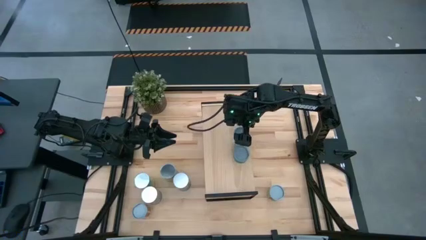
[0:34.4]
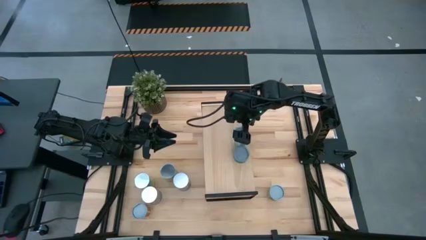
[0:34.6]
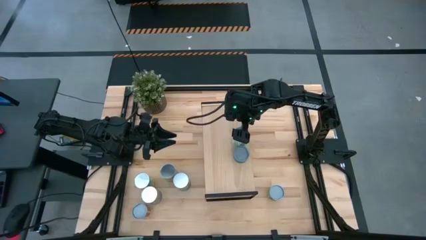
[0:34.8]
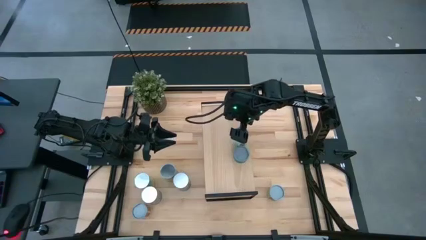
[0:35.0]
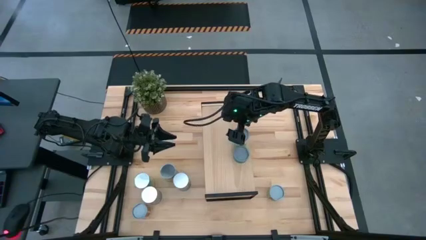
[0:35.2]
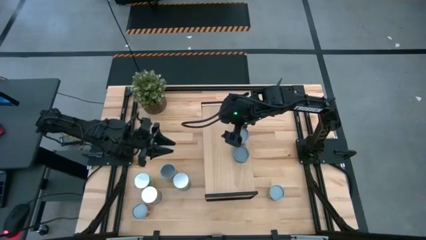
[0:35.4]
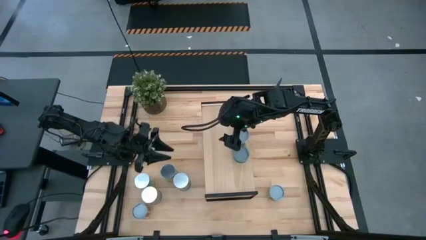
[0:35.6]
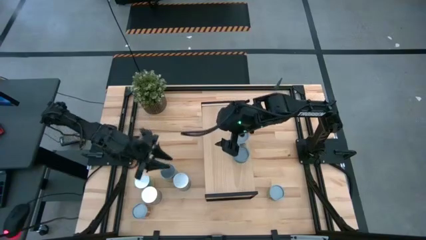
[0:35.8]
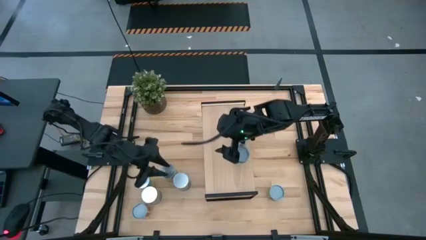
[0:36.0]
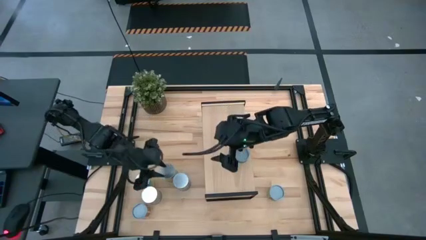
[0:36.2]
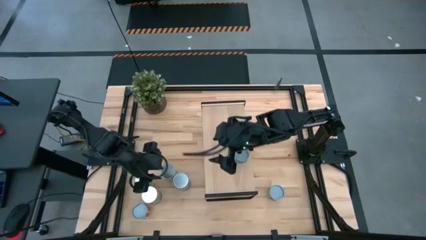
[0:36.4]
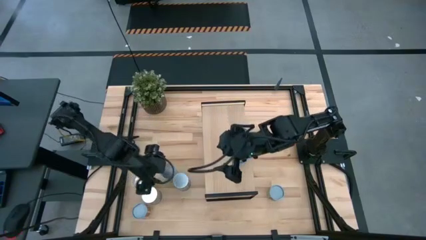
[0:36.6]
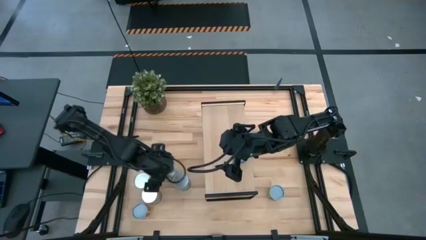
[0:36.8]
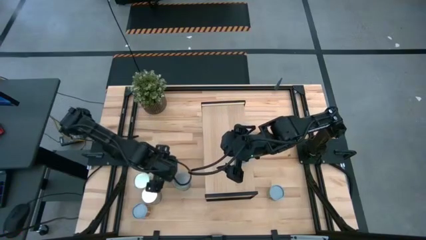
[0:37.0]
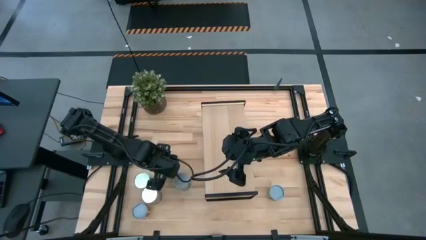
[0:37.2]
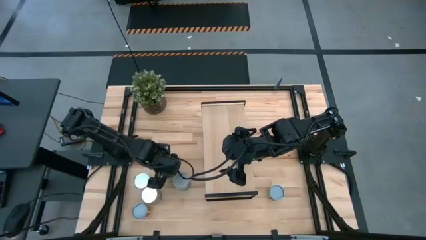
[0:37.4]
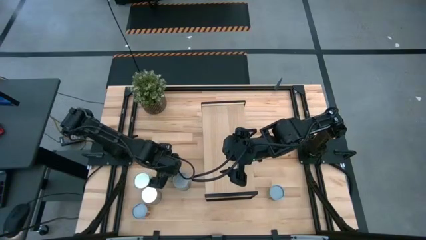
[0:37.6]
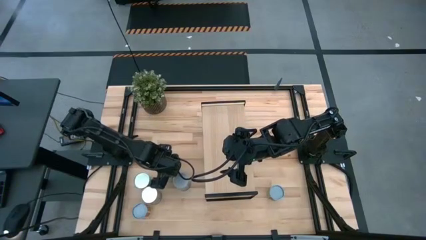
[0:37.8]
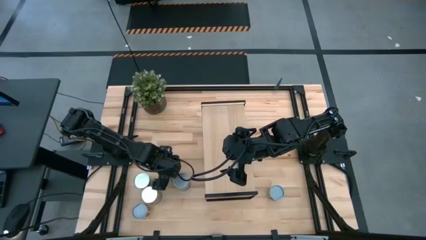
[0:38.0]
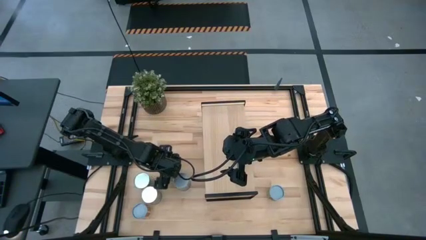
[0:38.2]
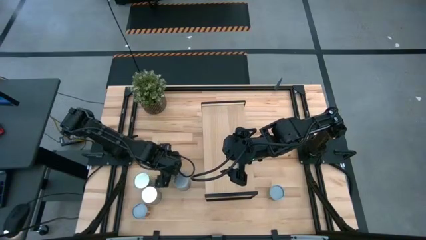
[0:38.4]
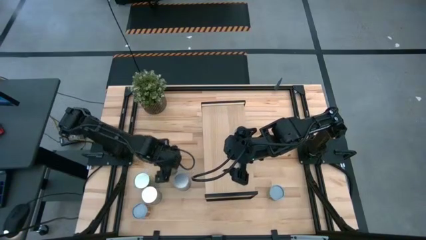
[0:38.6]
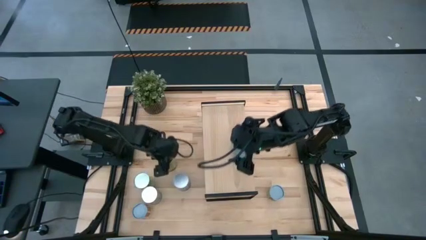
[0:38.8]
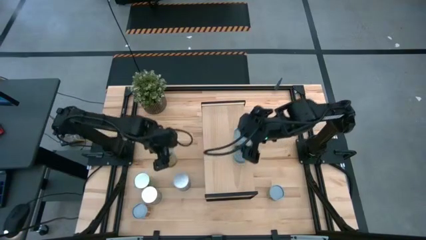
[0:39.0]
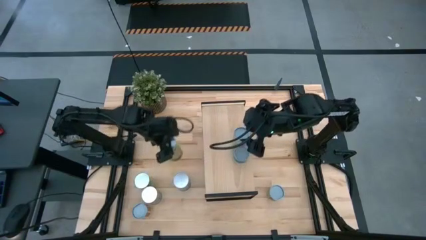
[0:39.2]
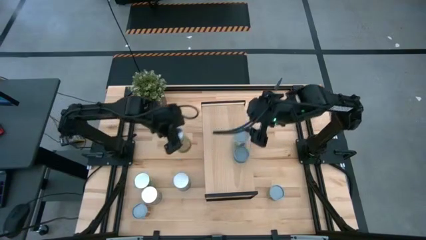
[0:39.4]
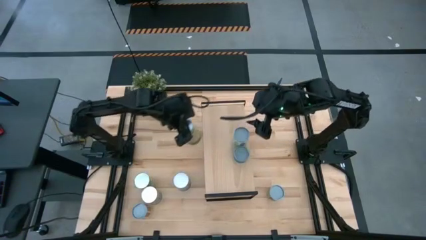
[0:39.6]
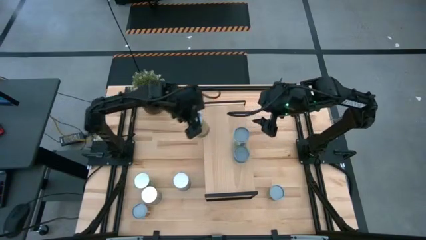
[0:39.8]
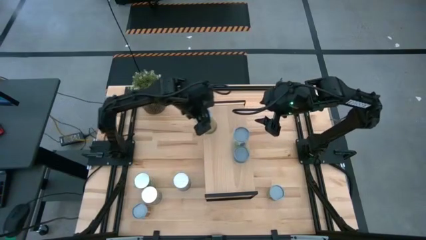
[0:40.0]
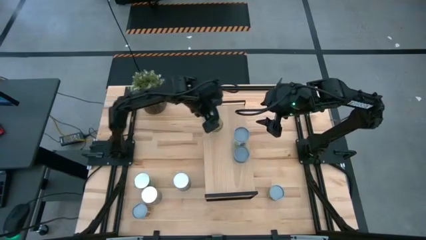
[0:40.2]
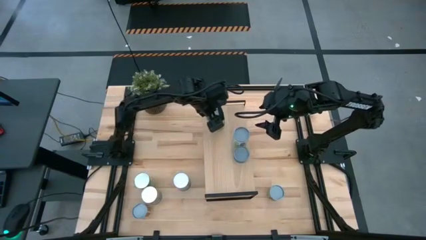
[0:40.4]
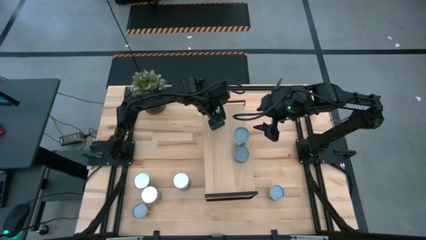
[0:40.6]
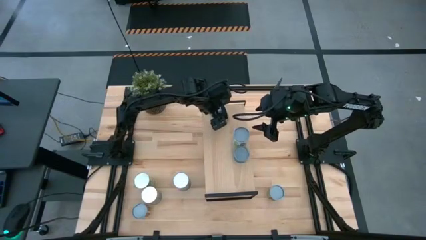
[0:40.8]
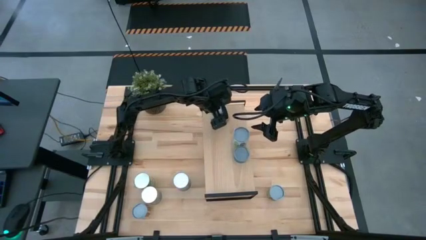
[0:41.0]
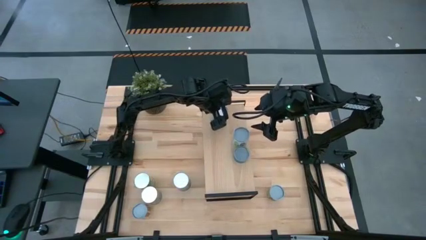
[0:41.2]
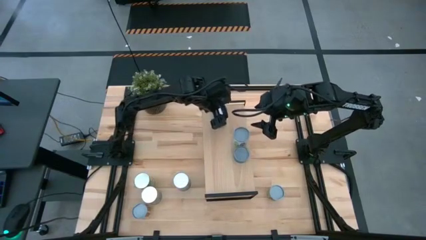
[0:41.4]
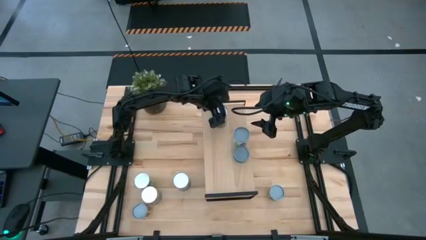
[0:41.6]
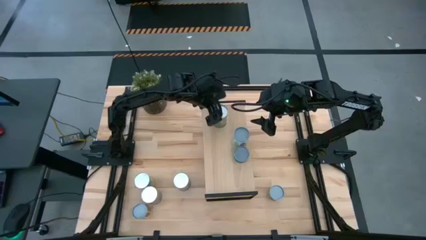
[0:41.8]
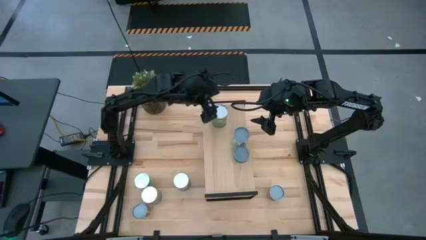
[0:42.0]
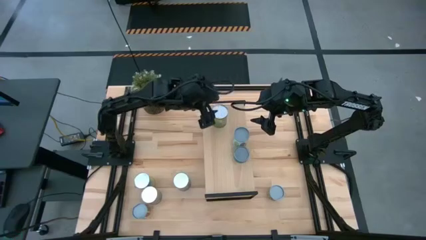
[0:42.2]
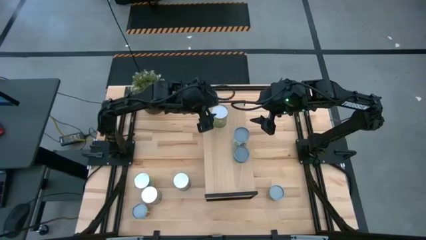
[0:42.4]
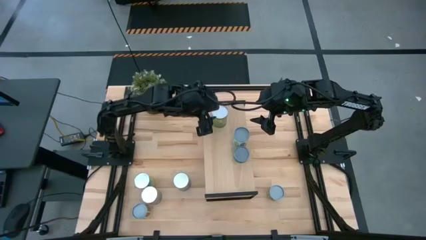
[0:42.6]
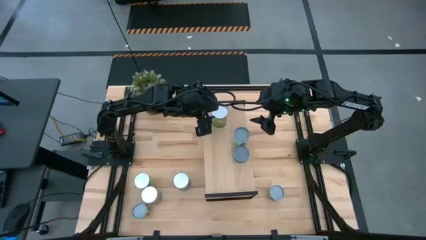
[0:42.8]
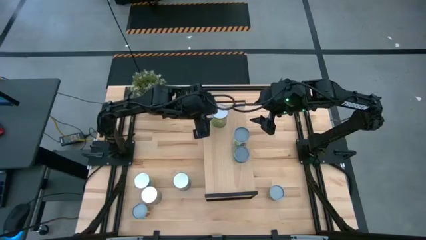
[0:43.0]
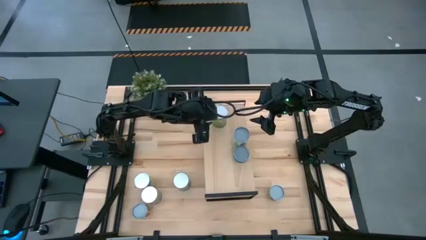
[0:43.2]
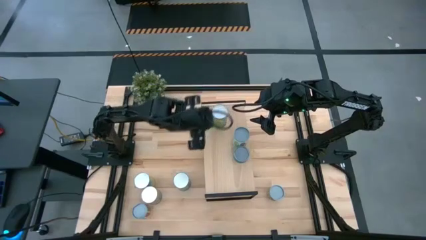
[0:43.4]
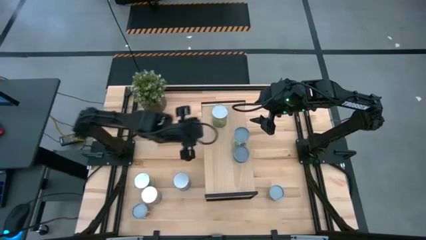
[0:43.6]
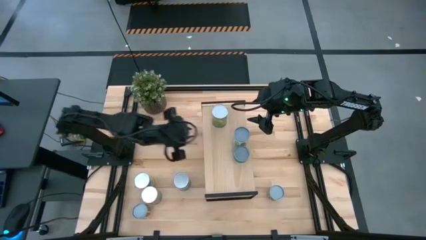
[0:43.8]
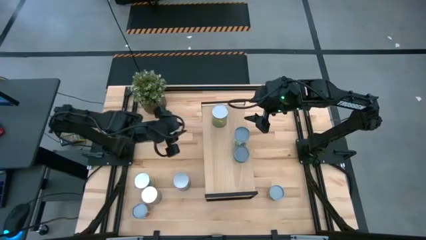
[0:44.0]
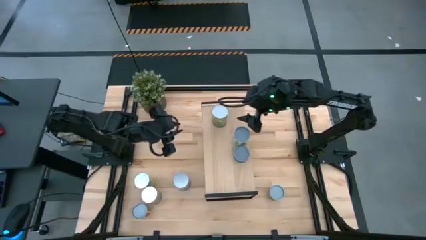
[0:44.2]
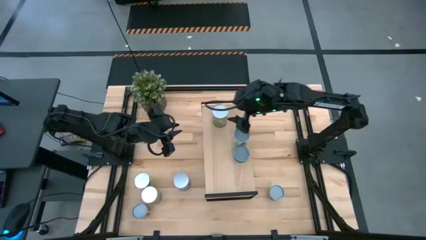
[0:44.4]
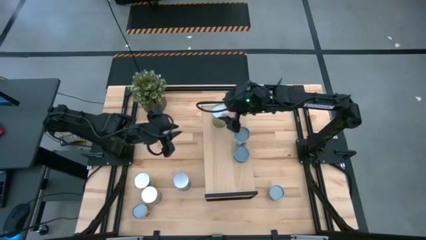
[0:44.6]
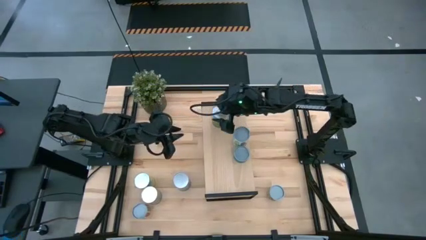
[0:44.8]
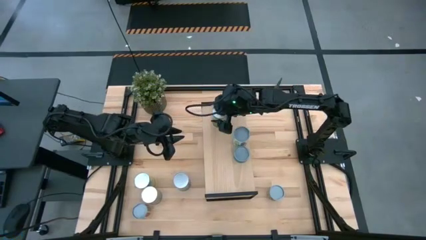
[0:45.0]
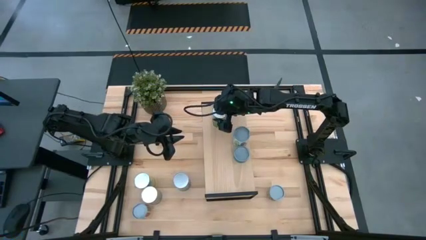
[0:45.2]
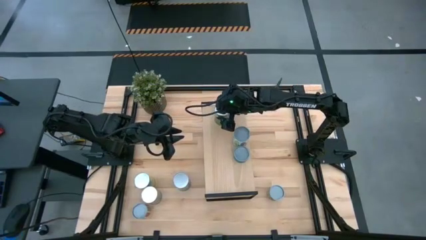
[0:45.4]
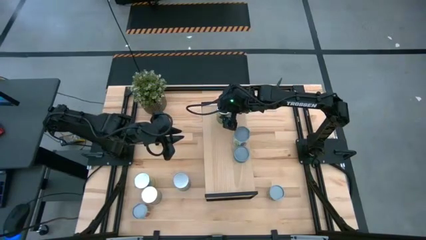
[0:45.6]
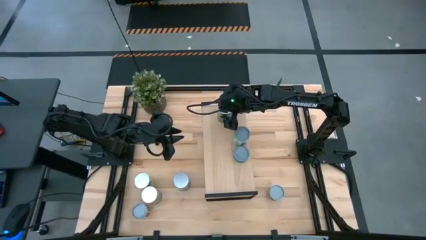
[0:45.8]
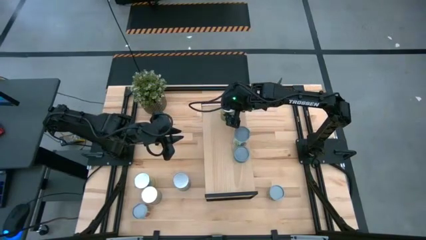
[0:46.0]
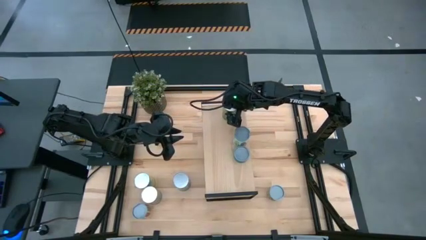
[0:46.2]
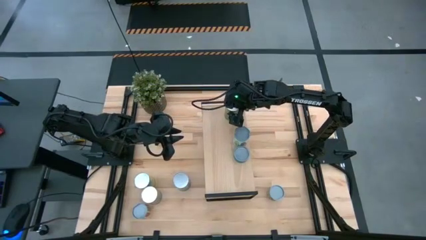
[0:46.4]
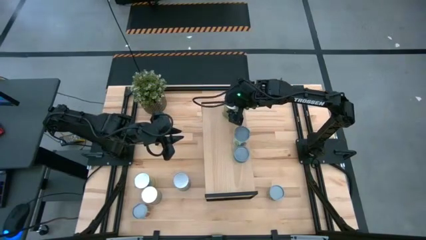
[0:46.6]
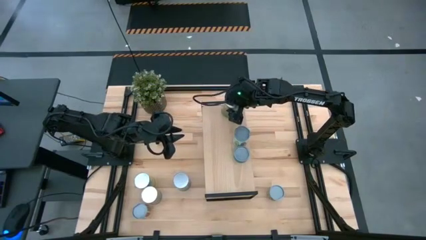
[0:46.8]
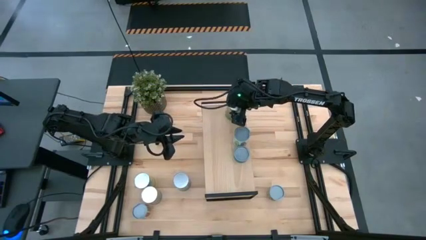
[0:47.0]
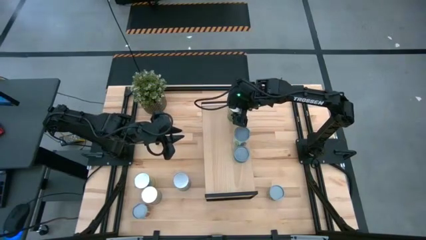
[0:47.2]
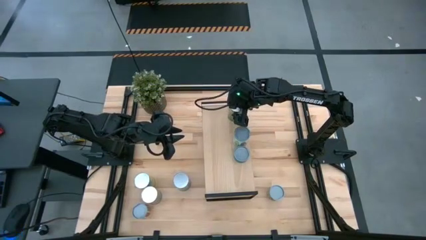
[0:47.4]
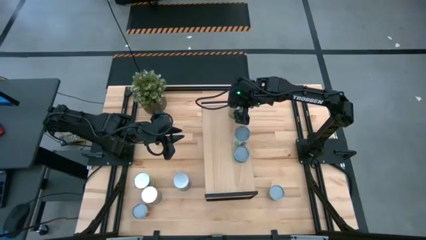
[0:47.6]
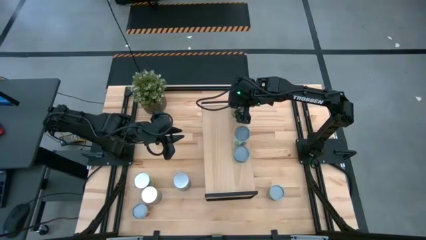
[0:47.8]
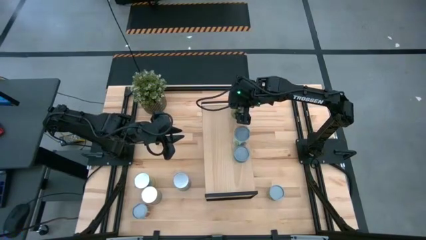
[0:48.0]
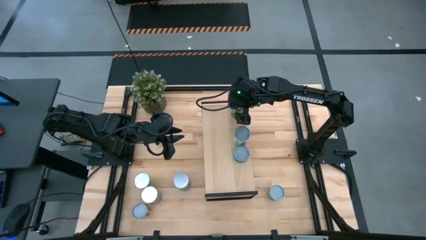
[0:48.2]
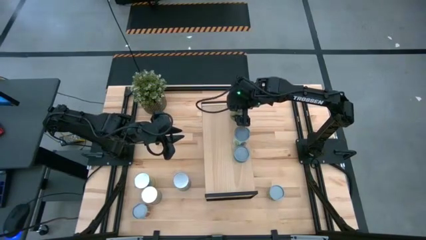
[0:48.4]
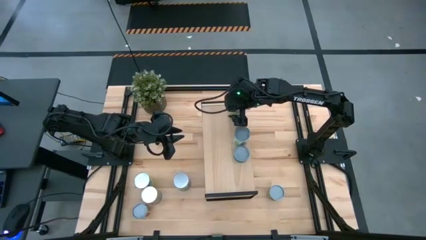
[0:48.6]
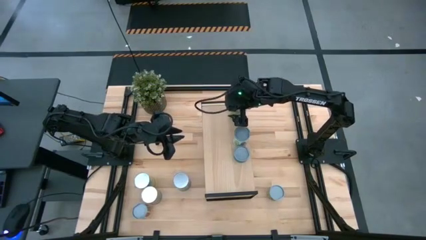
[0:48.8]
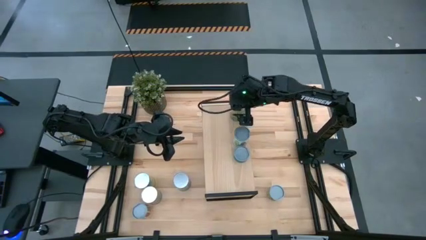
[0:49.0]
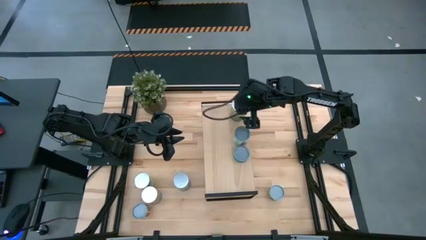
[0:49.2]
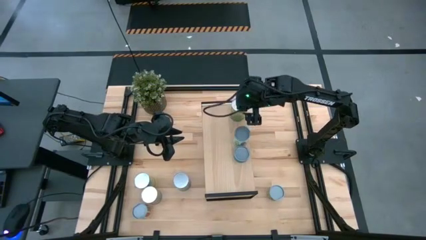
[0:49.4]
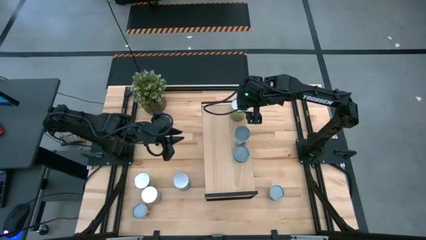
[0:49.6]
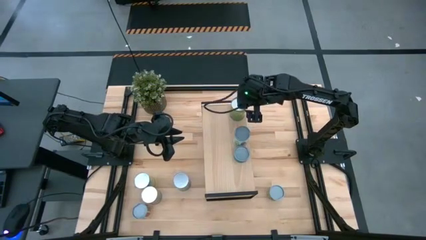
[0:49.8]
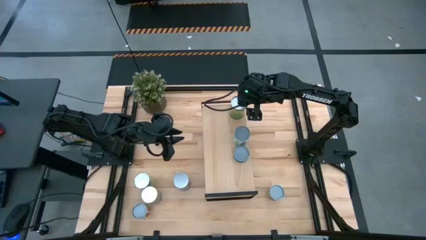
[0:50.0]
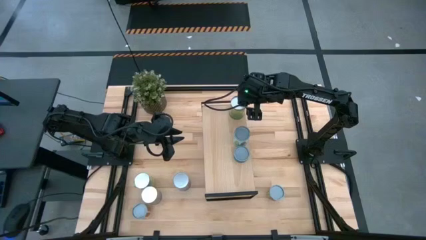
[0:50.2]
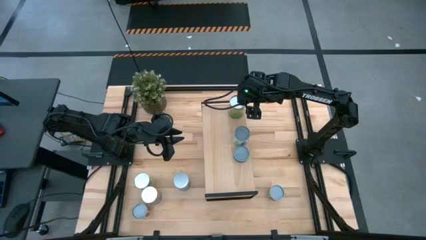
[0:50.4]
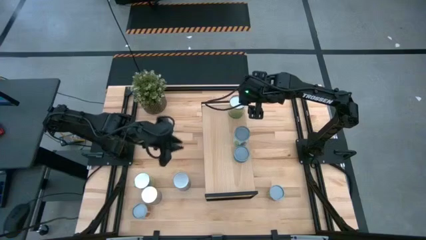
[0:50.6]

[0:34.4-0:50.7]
Task: Pick and place cans onto a shelf
Put the canned oranges on the shelf
